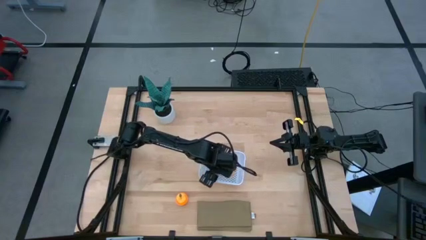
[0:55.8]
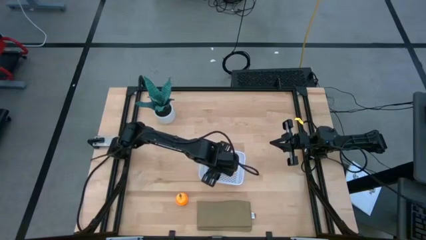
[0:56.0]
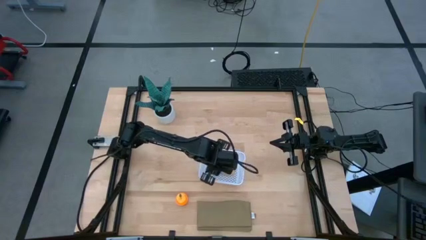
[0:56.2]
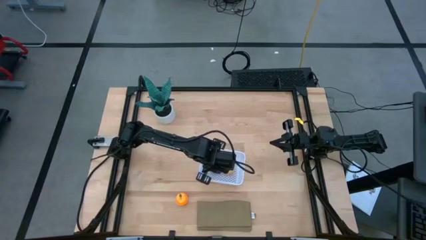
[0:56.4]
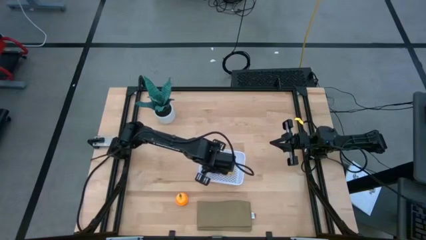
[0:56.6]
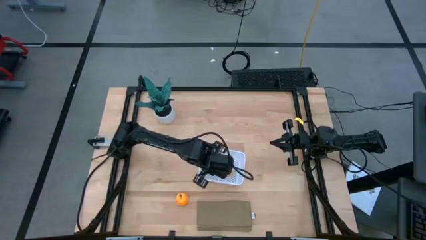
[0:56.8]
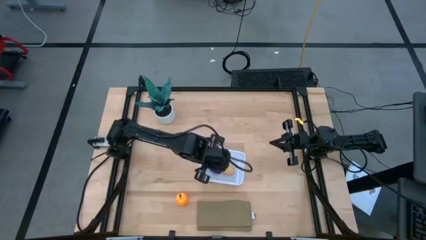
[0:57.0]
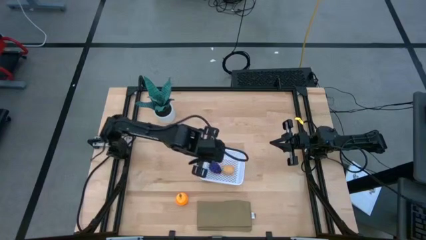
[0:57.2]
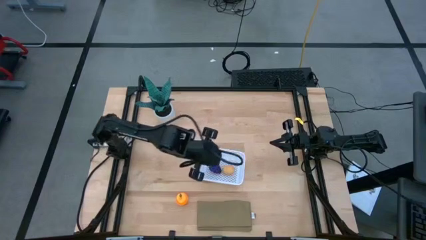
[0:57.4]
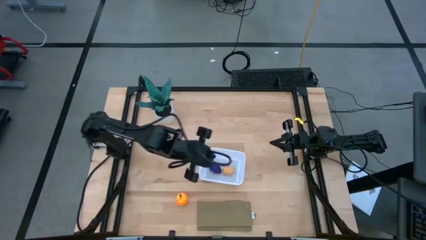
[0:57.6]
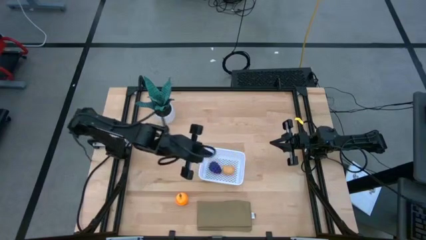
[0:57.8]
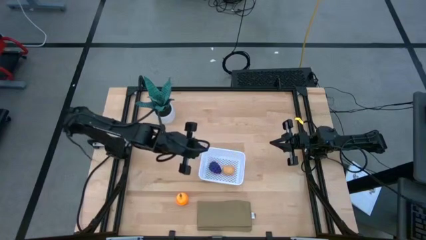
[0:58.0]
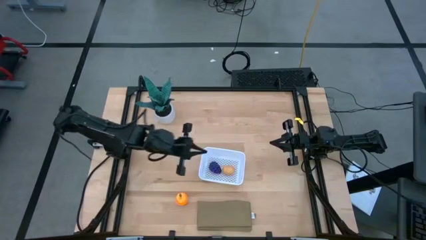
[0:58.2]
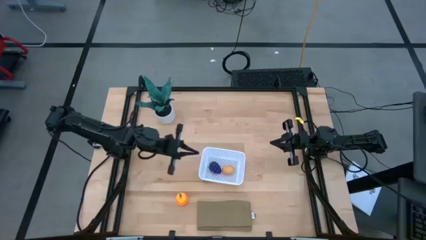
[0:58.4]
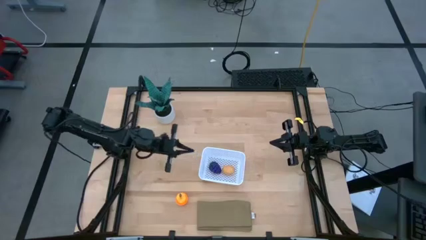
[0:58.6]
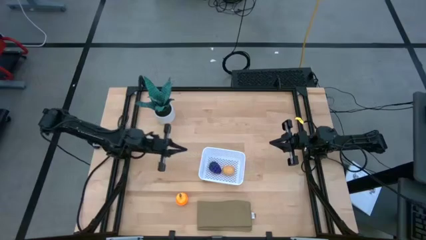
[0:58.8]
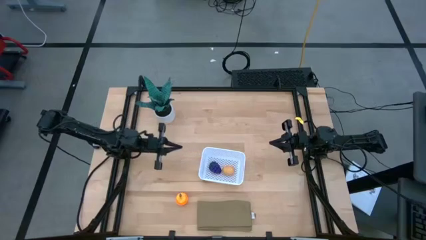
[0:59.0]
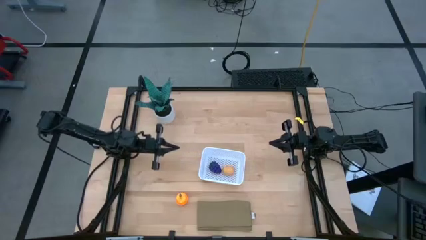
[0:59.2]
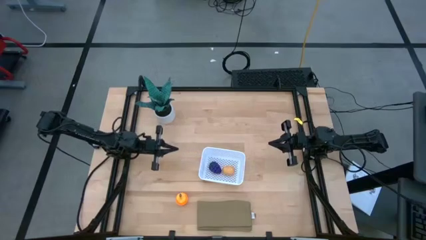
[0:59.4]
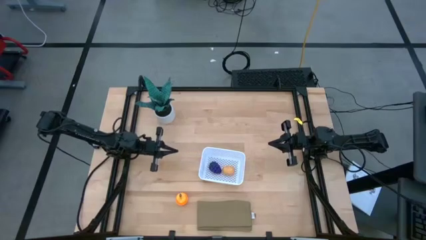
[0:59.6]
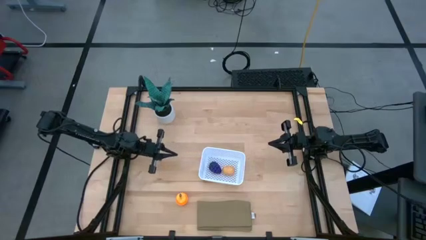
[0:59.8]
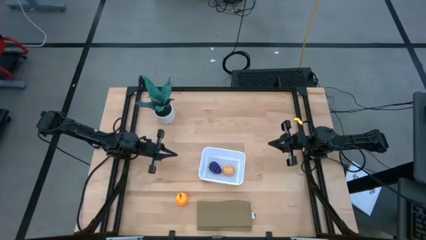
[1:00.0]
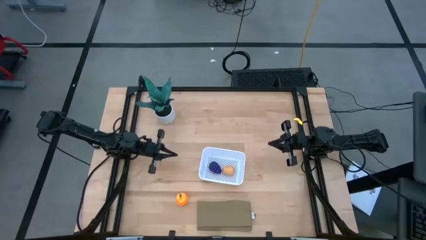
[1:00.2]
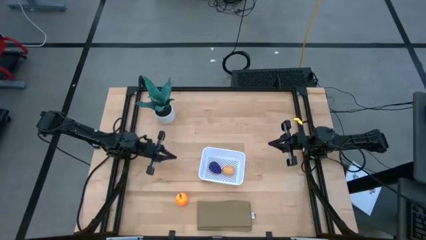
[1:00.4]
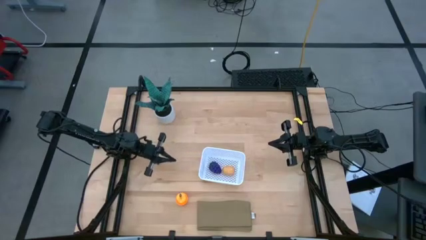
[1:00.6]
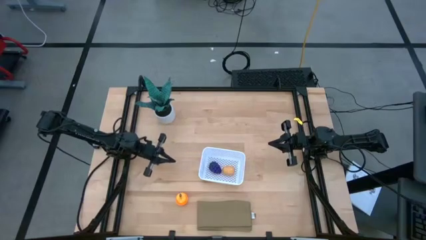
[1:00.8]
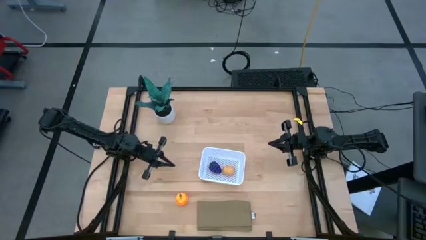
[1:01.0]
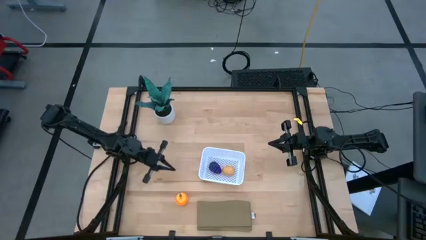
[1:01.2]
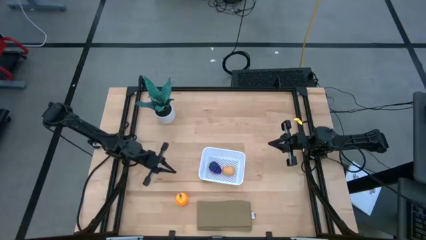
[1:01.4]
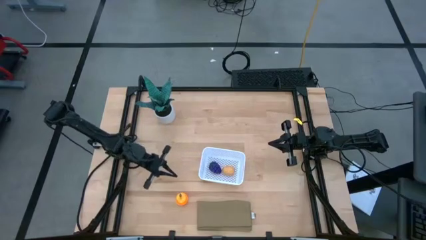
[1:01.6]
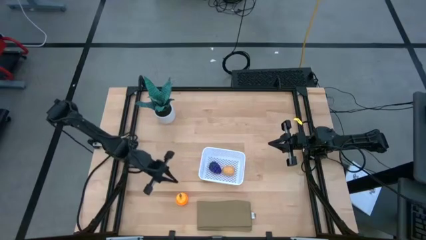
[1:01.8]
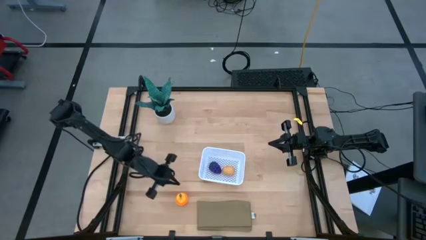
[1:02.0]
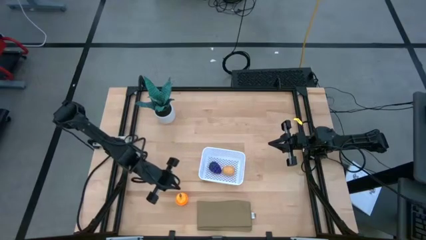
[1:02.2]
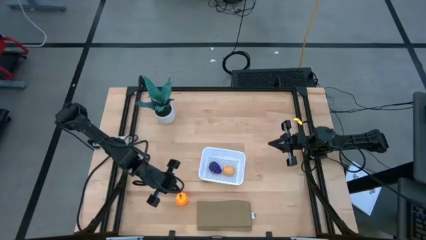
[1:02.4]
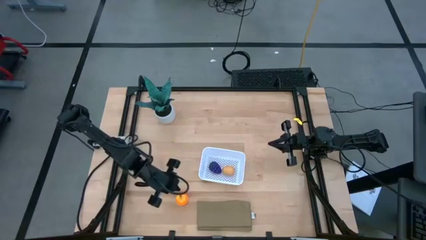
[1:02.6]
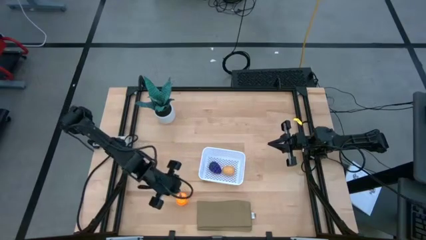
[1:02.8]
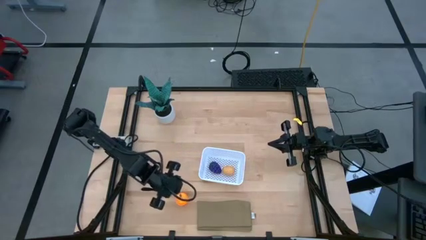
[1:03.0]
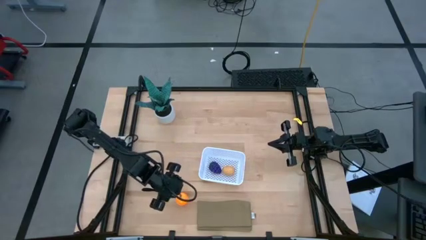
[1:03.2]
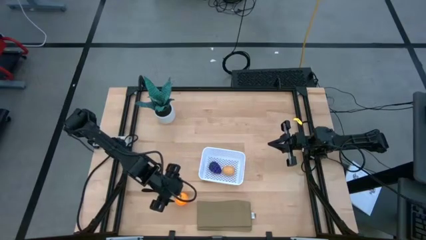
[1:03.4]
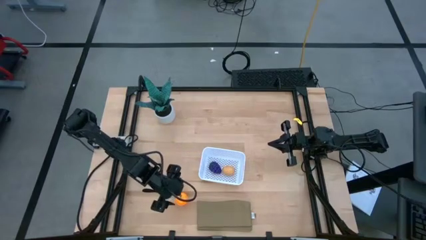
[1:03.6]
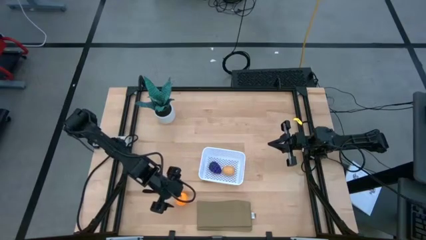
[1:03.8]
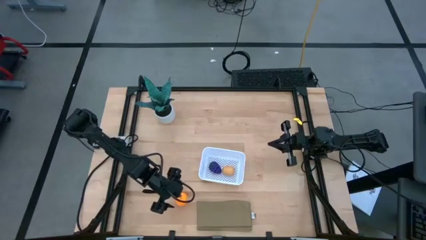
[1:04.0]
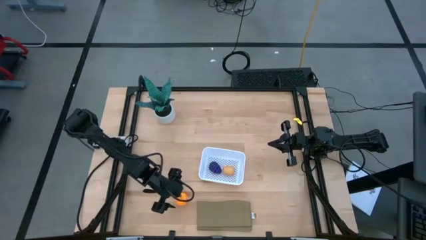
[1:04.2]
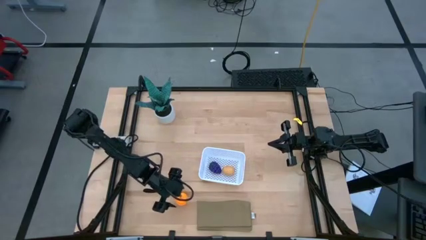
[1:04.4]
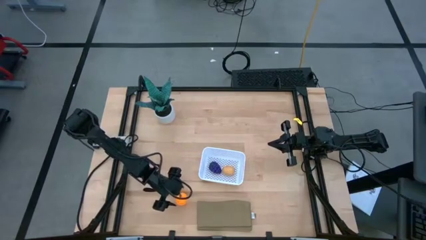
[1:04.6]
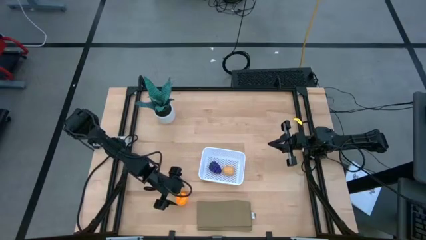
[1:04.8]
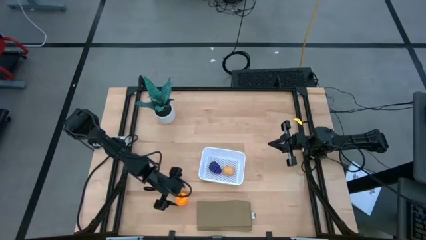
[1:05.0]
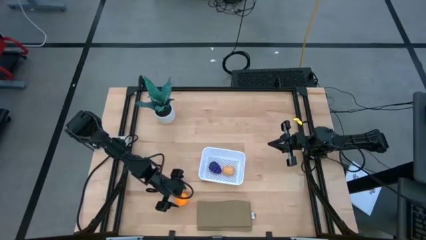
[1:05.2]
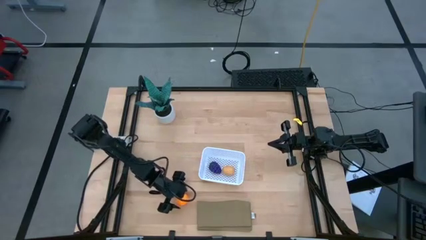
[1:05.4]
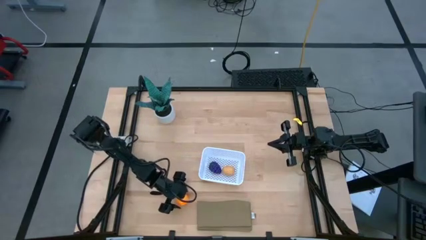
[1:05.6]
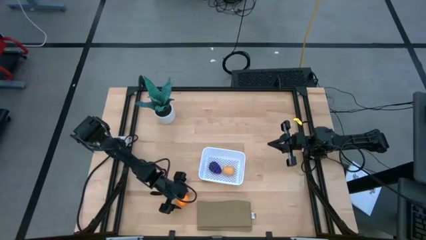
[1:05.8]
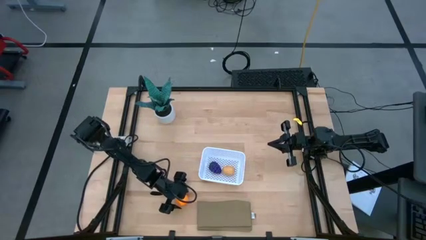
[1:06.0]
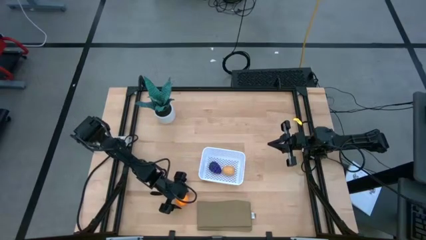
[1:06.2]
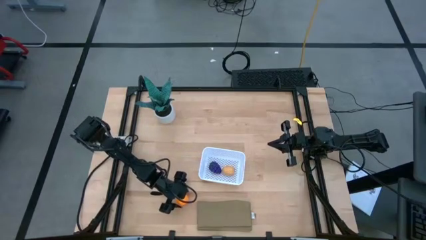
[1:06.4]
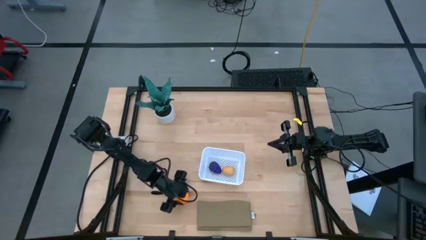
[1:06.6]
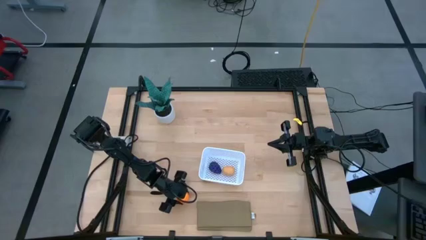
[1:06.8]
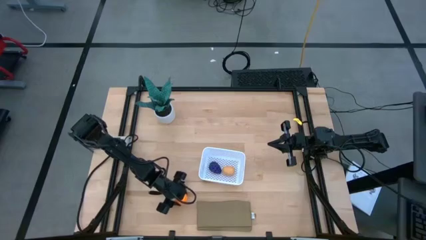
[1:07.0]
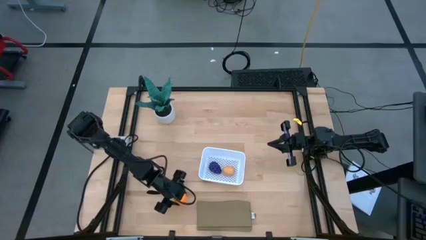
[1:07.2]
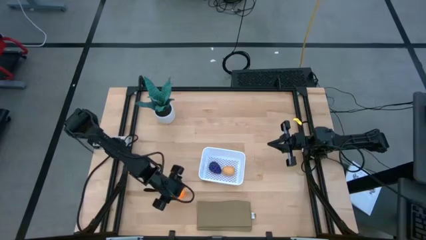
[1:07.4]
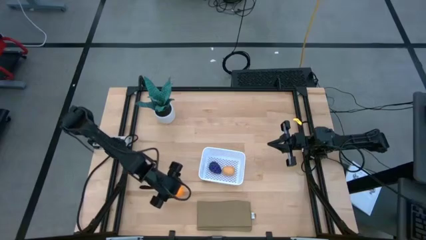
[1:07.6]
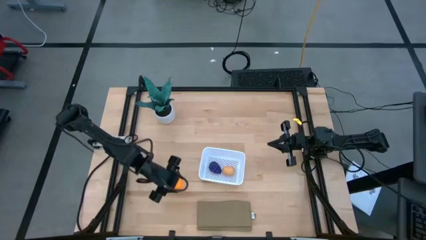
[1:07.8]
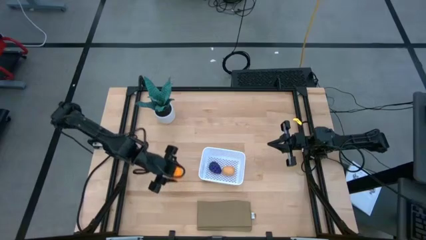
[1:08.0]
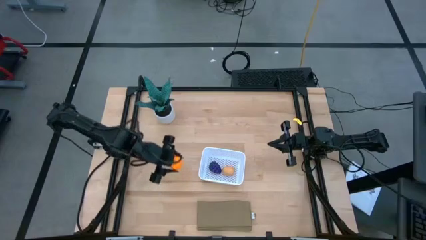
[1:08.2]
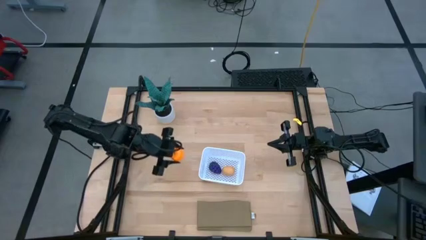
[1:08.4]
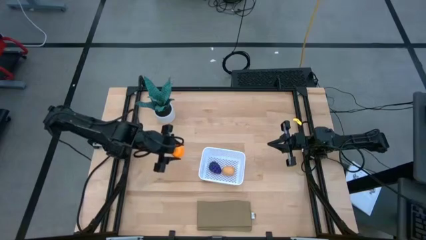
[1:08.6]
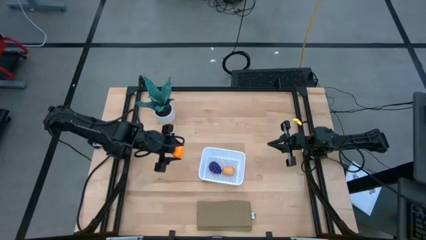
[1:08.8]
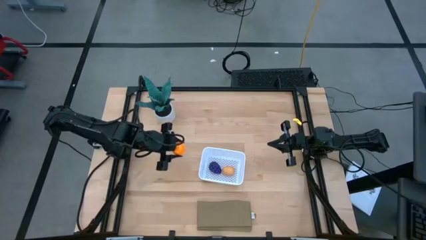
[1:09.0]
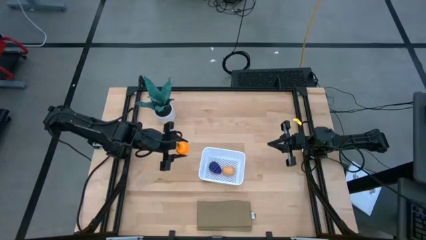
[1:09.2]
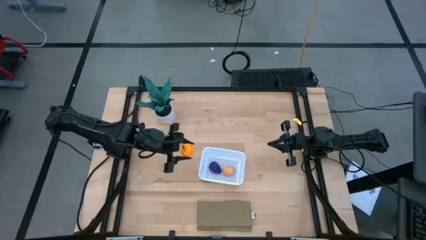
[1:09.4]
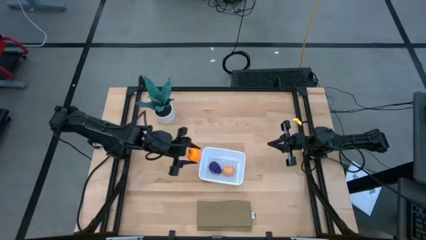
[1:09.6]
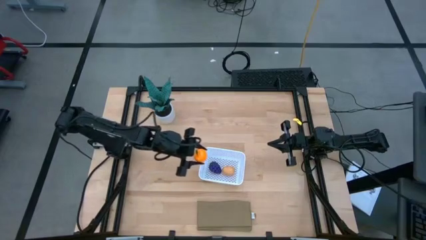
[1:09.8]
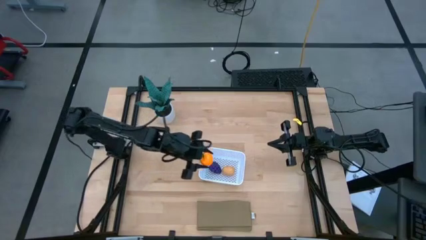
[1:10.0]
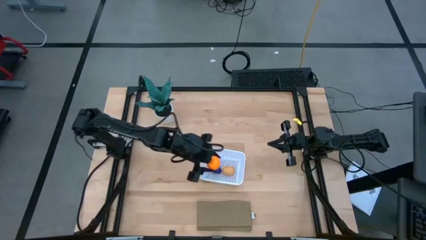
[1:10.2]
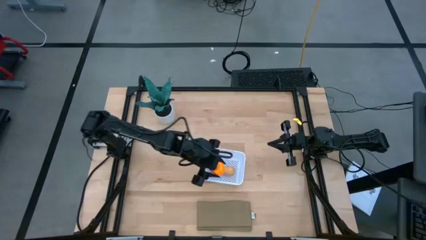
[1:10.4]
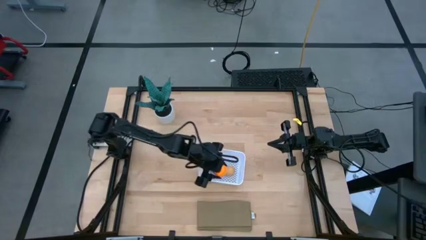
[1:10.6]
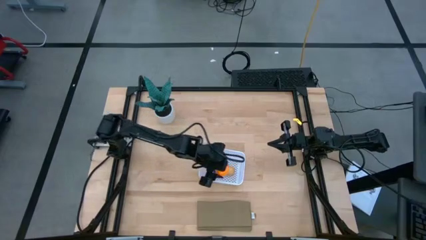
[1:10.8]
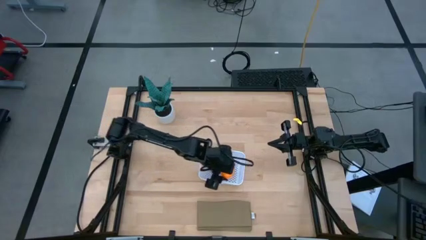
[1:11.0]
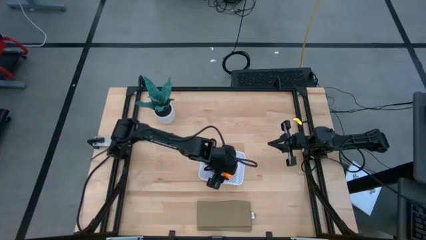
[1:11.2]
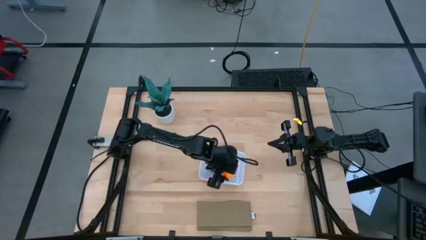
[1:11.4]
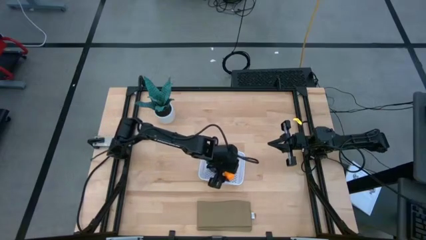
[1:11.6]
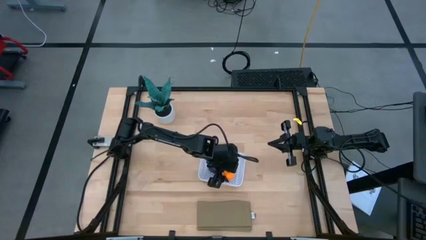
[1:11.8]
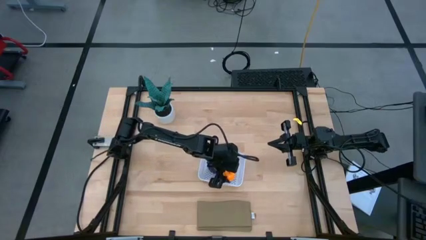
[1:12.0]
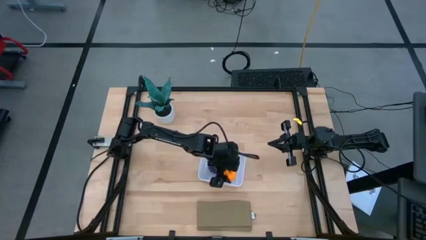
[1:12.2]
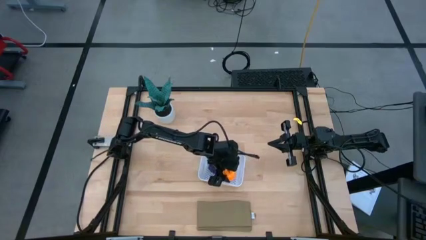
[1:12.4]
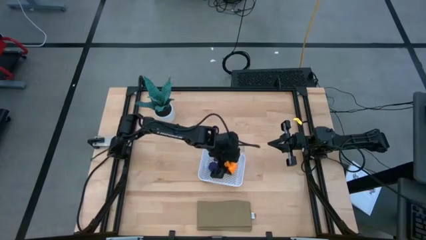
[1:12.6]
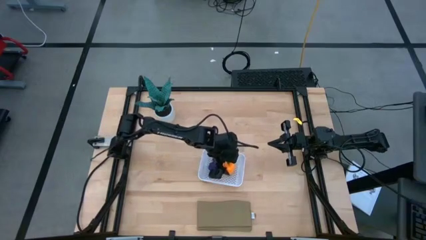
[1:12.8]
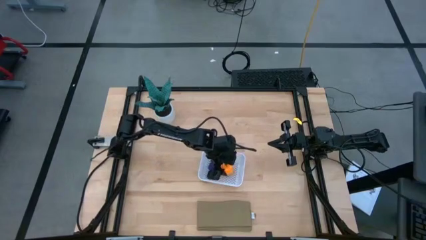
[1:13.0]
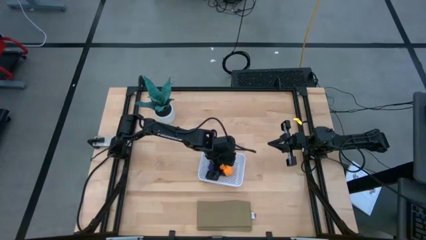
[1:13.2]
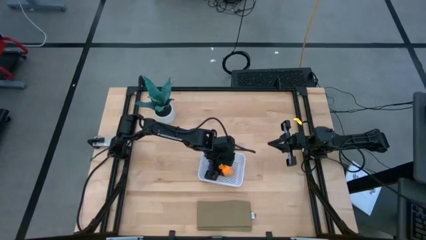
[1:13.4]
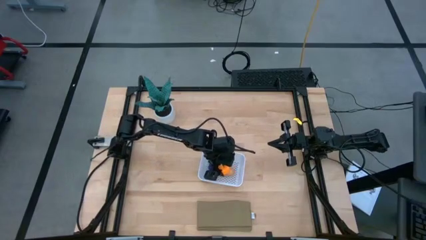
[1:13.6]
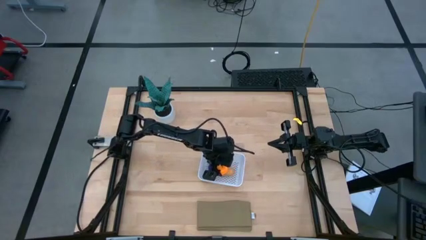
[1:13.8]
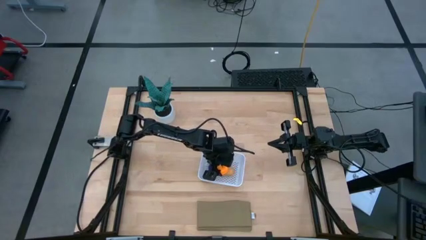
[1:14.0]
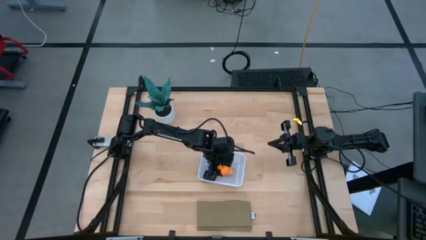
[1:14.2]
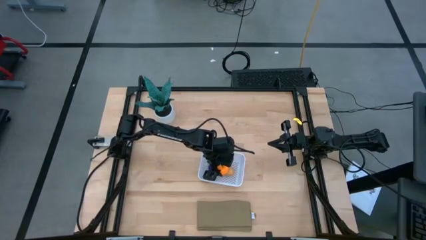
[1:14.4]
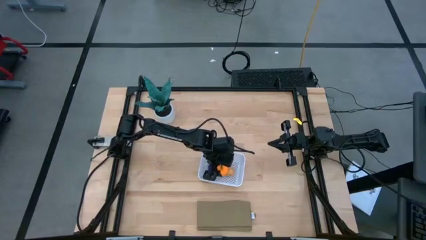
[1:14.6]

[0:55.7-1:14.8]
Task: Pick and placing Produce into tupperware
Put the orange into the white basket
